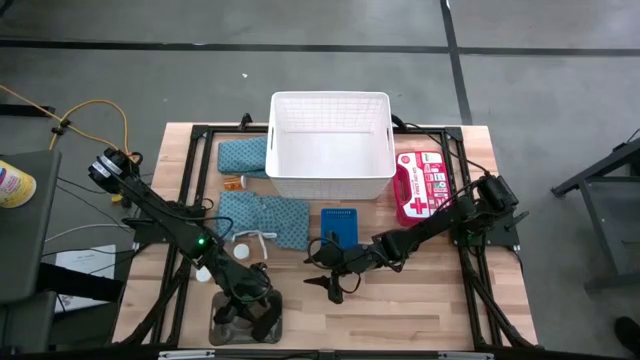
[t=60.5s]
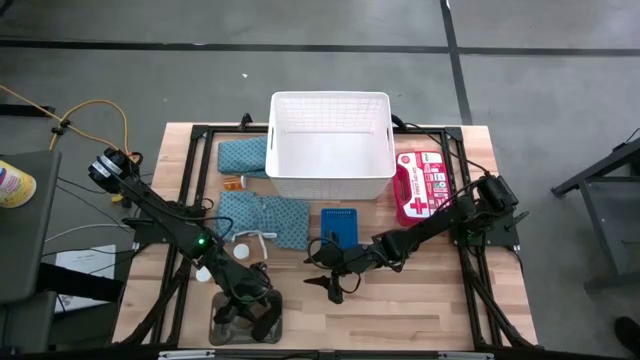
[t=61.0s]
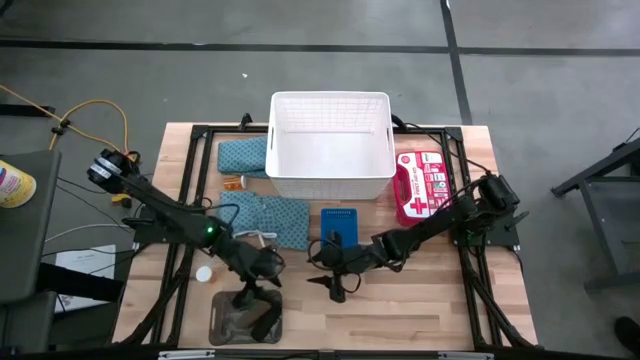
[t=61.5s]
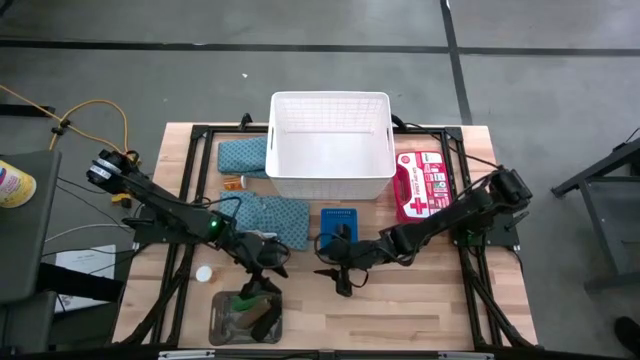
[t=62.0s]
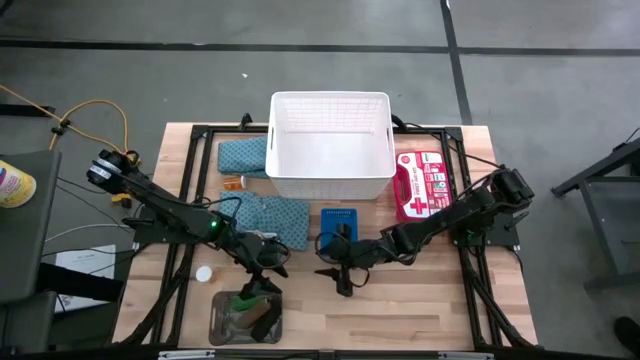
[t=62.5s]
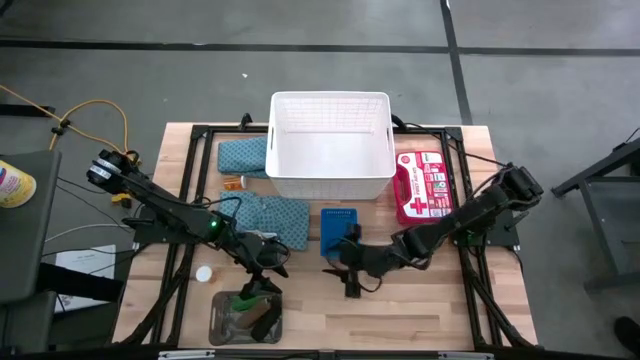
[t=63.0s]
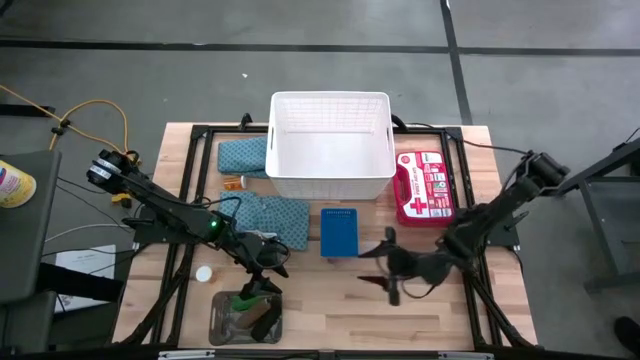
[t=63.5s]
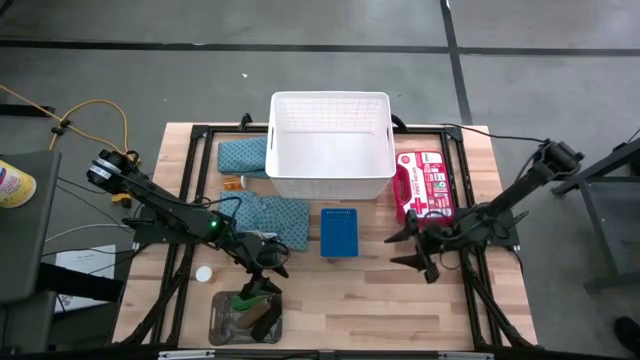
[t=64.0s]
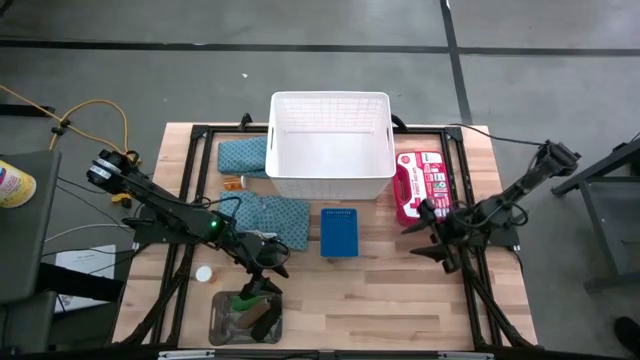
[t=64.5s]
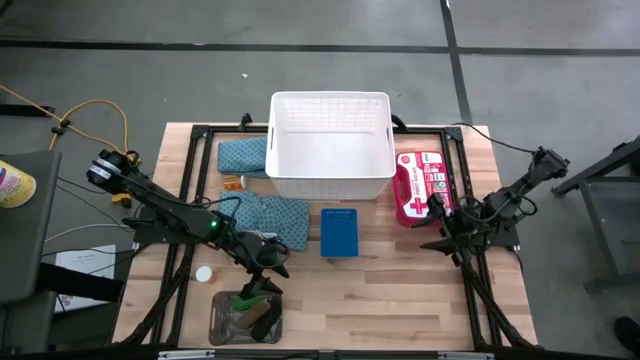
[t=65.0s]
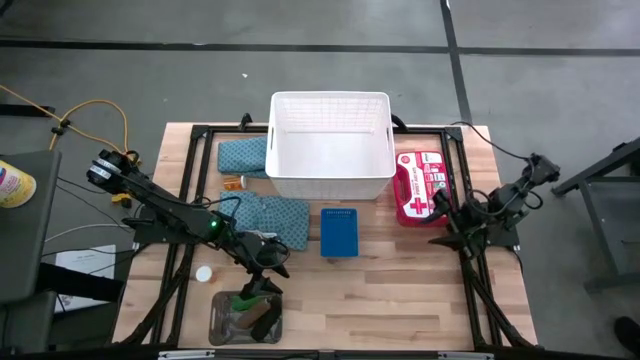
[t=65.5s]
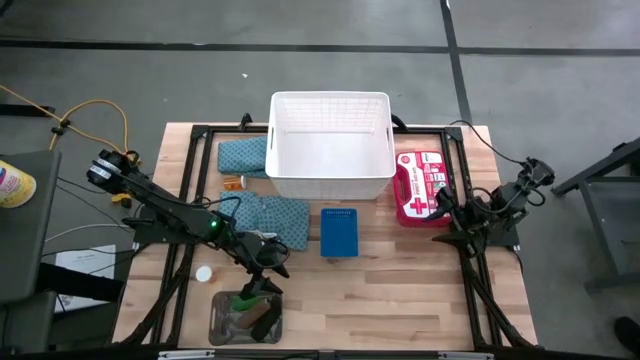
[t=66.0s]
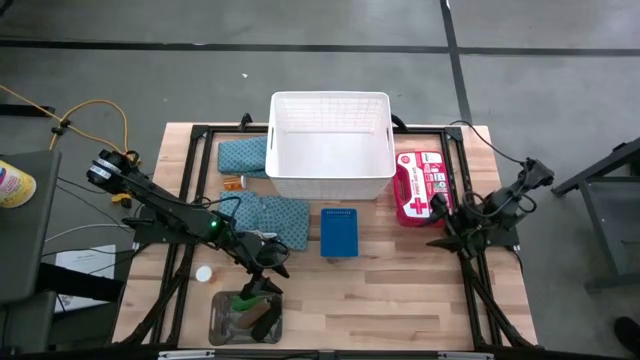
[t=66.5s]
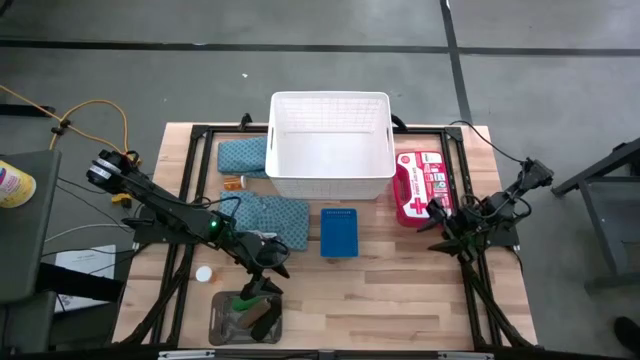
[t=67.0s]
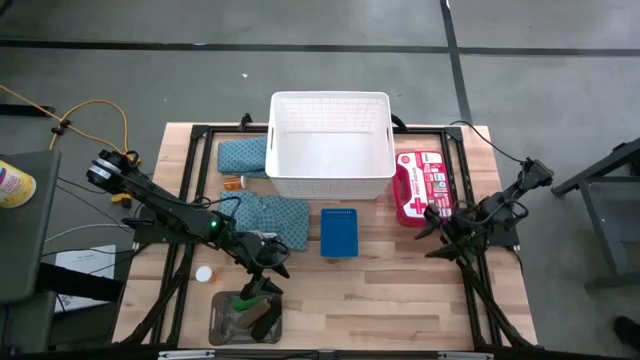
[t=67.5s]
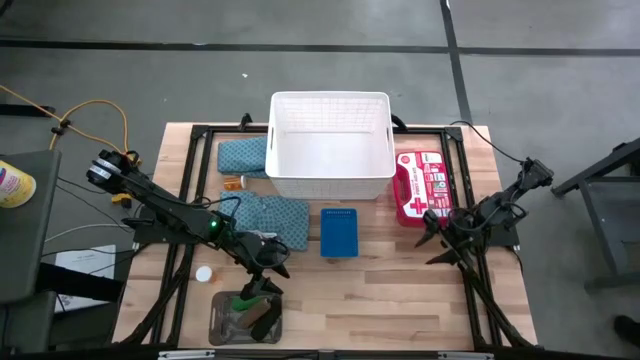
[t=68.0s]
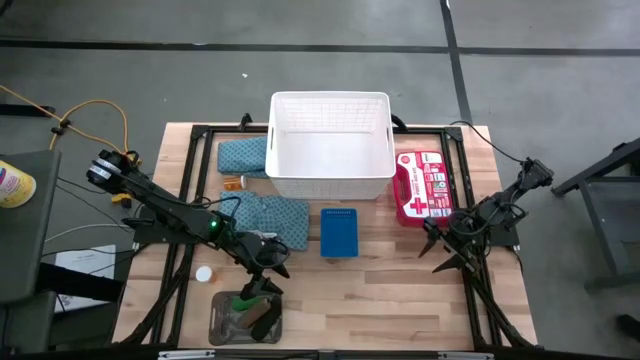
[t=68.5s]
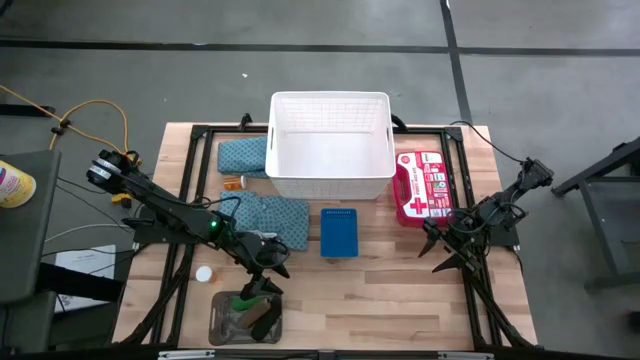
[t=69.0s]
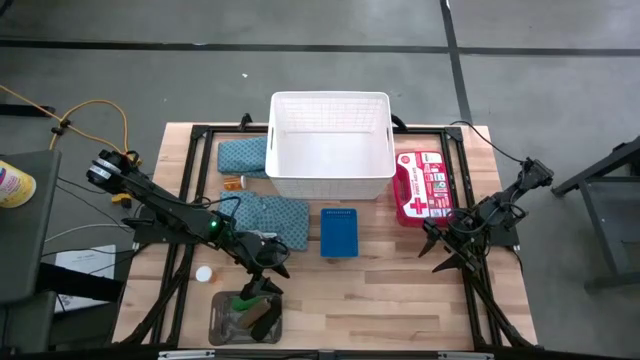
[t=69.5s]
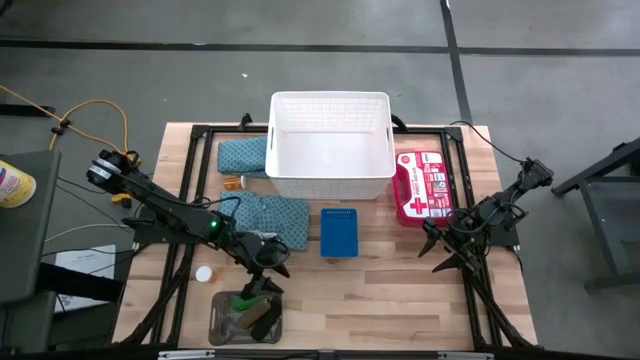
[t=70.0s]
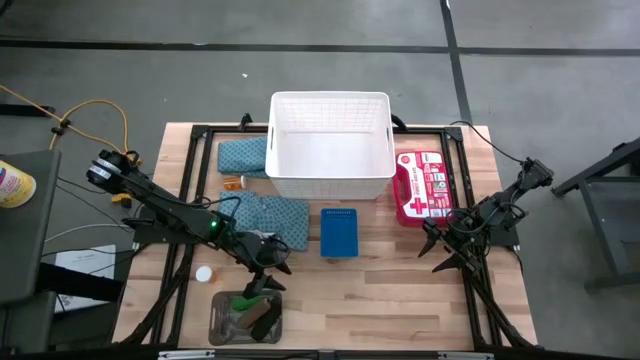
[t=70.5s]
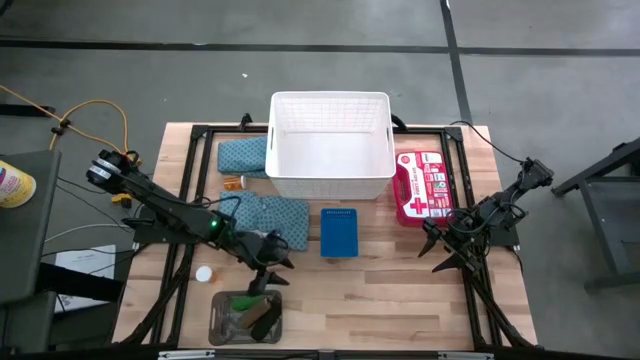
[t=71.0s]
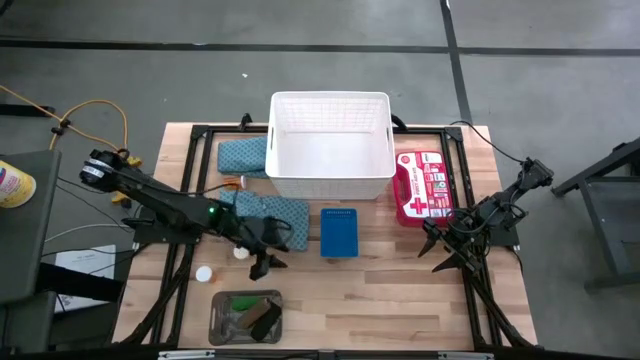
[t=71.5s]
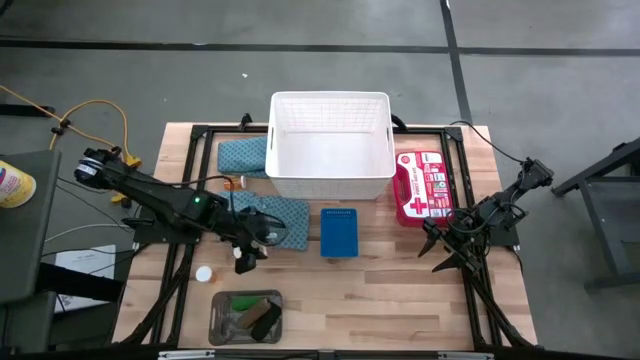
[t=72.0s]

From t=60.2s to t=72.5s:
Task: Pick & place medical supplies in basket/bin
Put the middle orange pill bottle into the blue bin

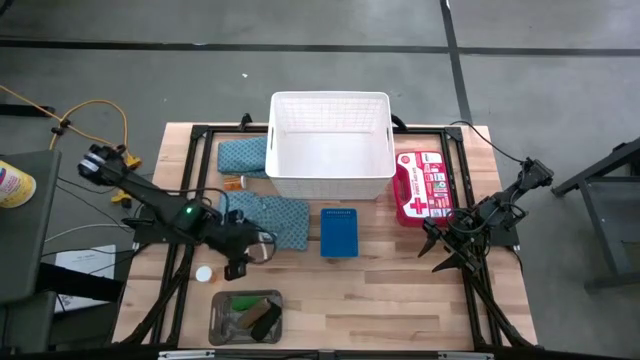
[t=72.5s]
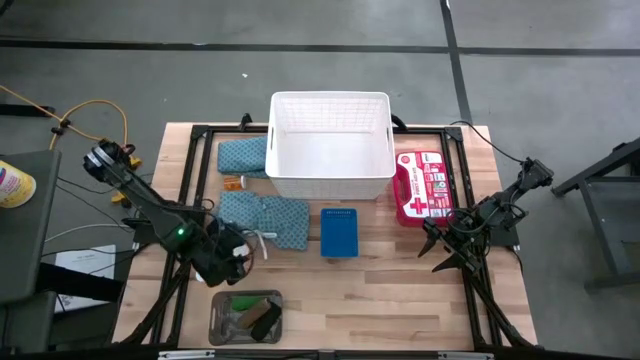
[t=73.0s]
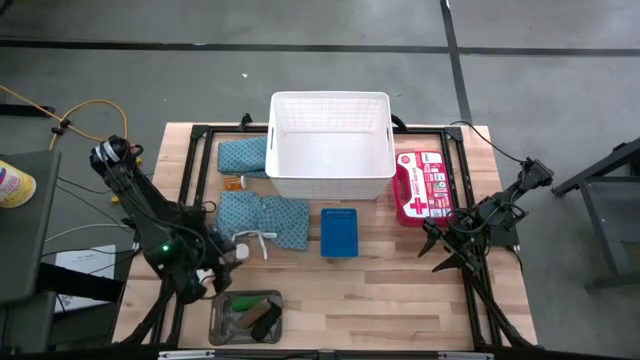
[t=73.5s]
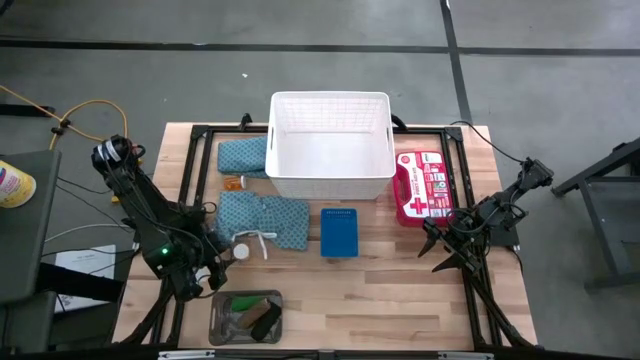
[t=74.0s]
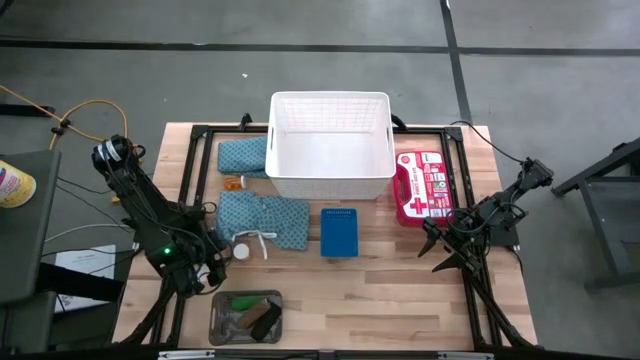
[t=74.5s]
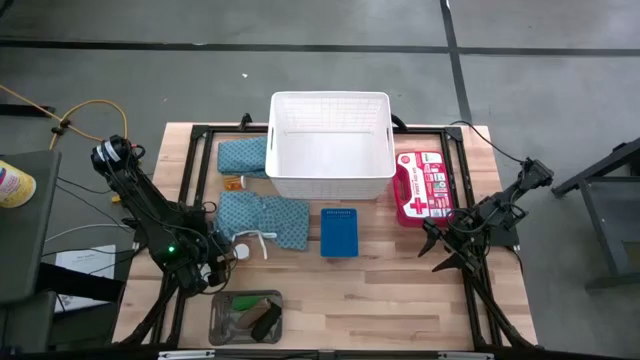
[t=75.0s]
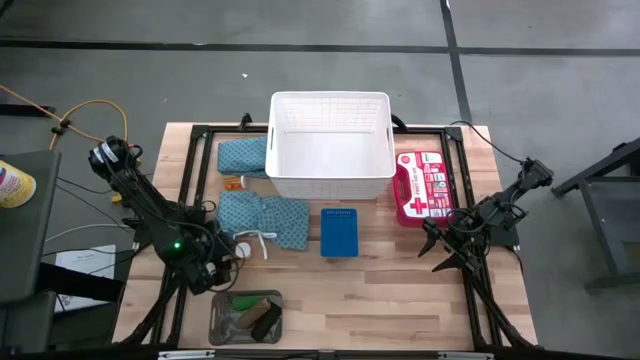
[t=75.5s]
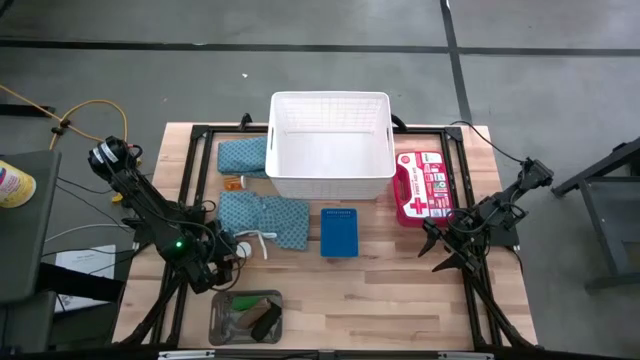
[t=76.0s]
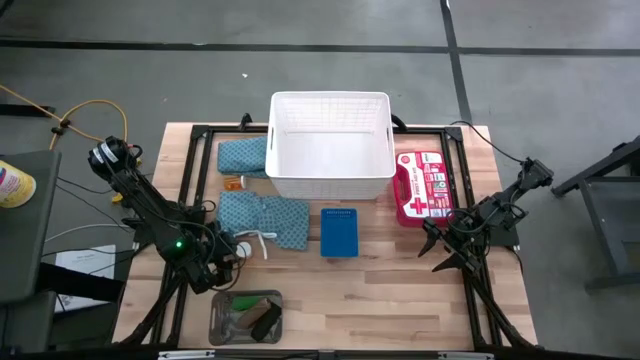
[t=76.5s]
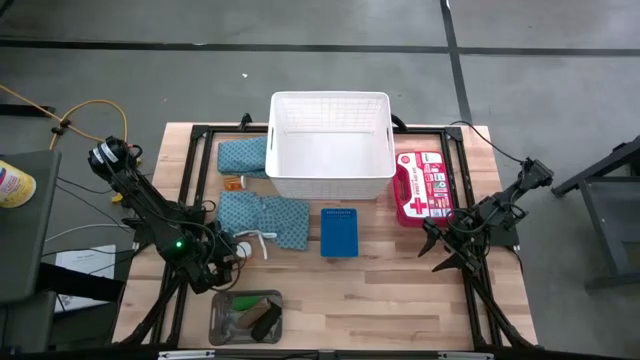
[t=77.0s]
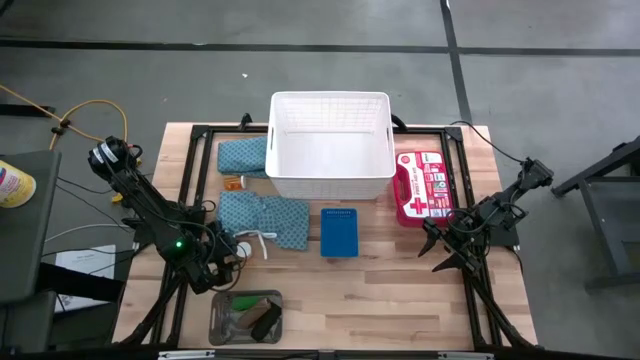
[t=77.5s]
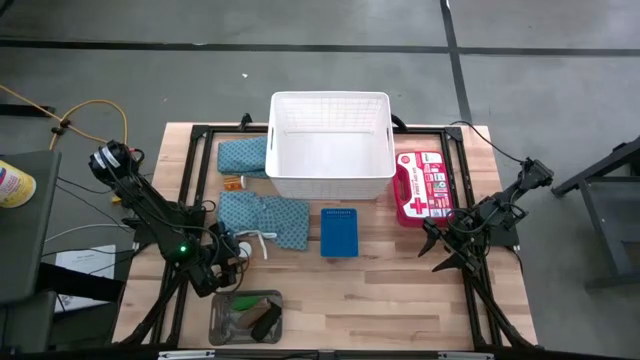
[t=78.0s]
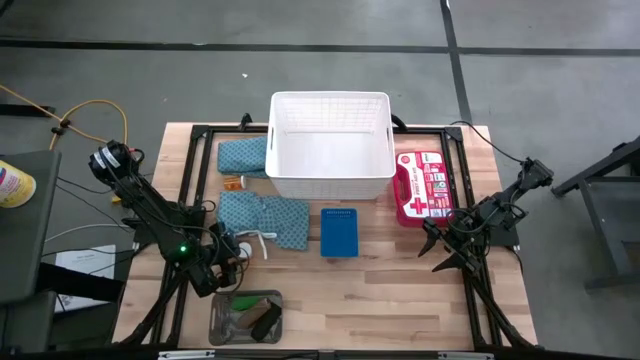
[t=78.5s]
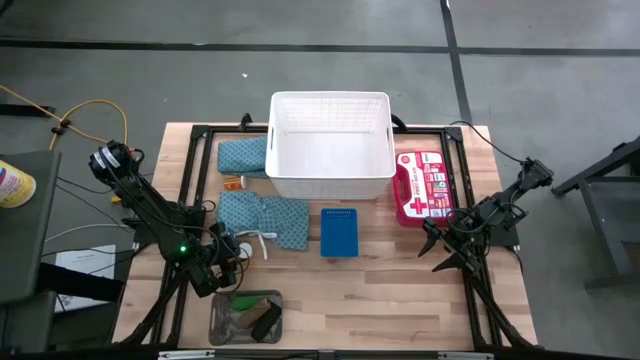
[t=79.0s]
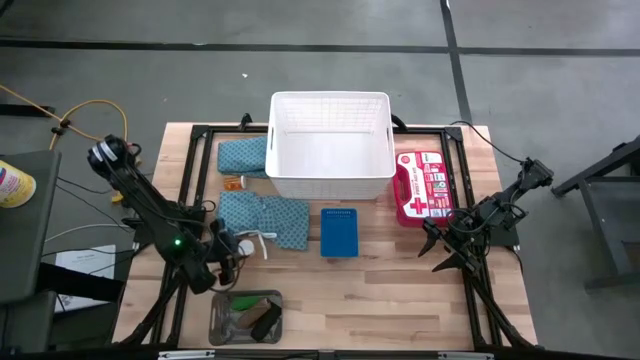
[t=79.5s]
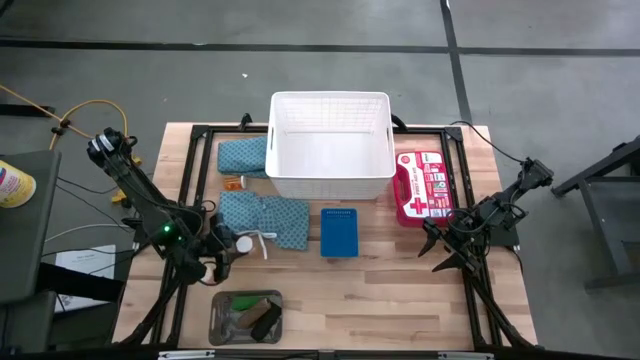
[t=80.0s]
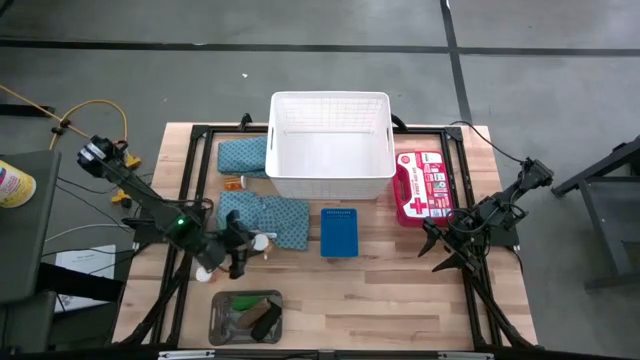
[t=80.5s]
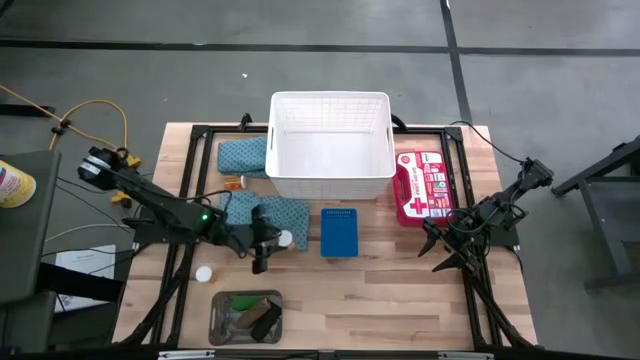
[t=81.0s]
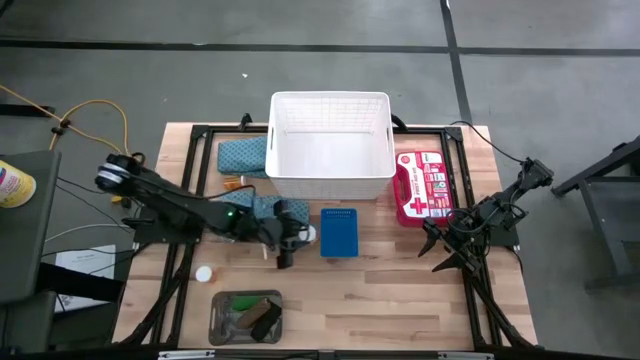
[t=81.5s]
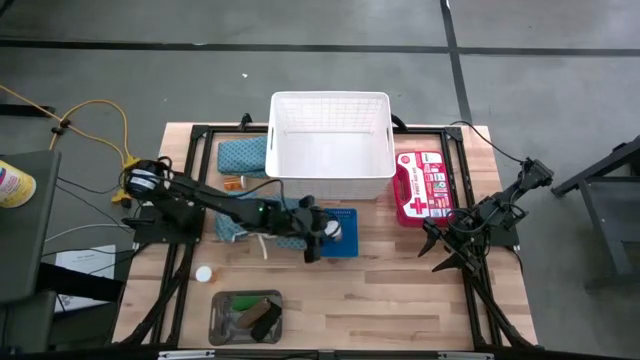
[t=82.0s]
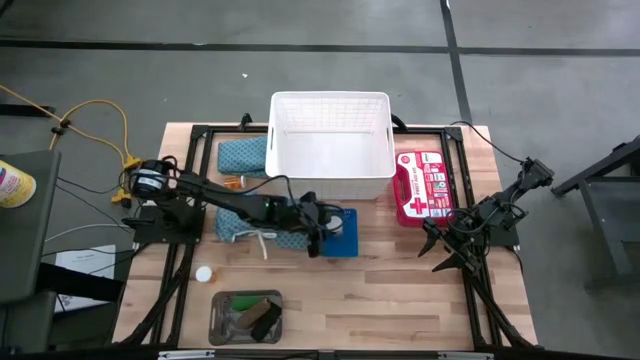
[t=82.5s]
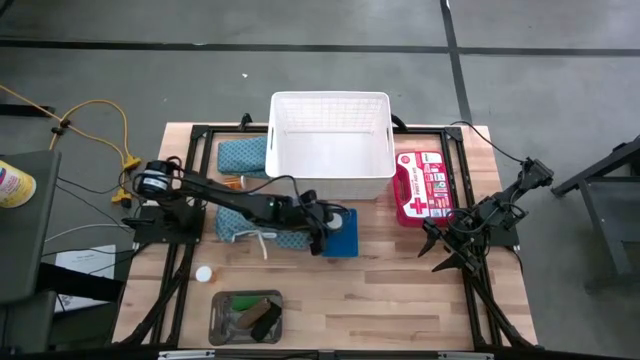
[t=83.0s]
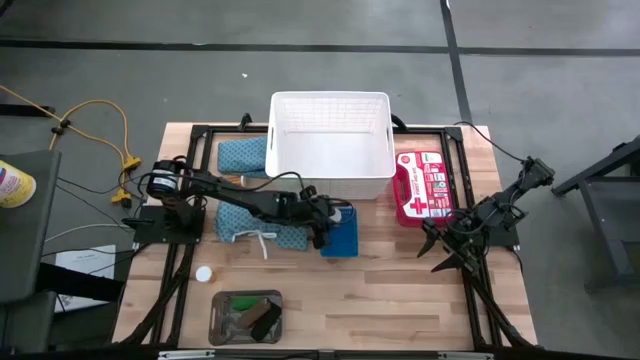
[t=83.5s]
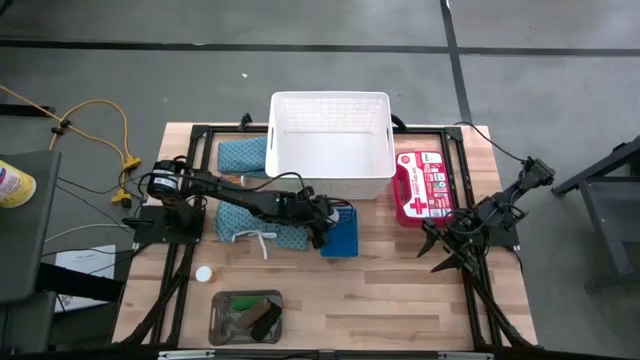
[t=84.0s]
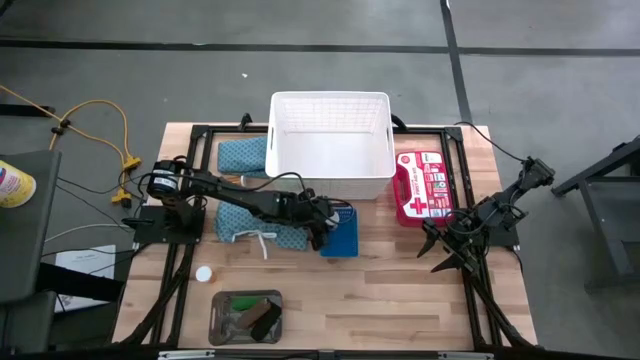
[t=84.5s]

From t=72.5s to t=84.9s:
Put the middle orange pill bottle into the blue bin
